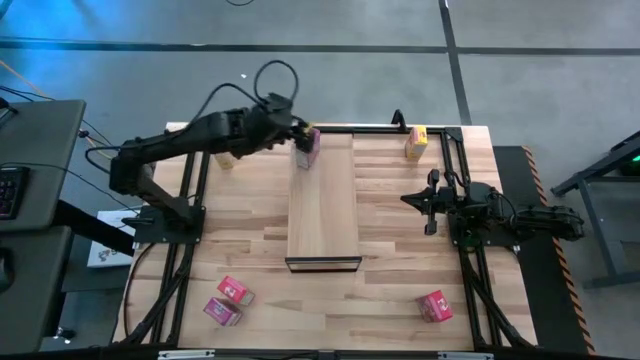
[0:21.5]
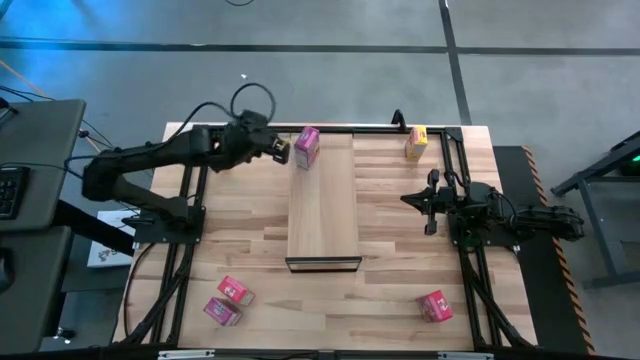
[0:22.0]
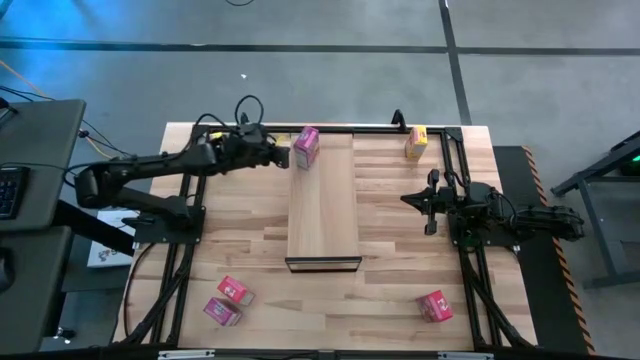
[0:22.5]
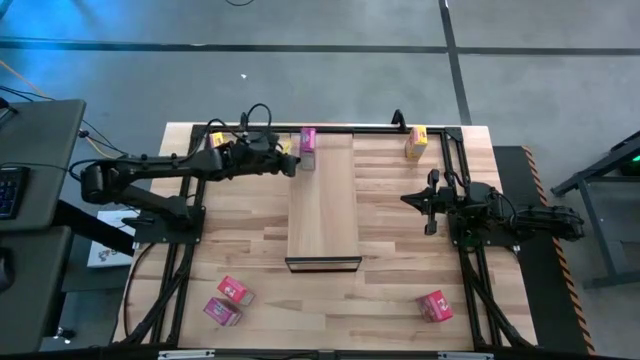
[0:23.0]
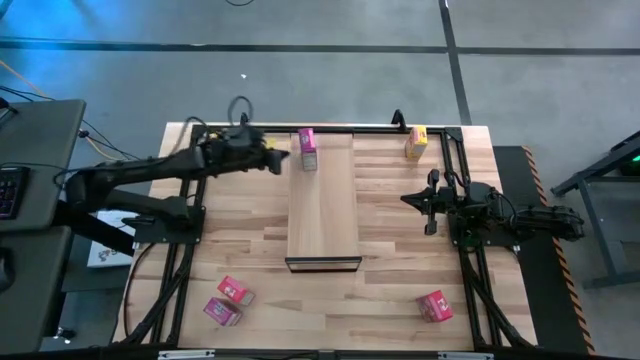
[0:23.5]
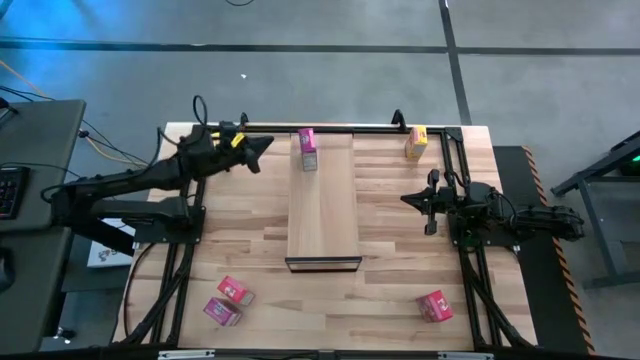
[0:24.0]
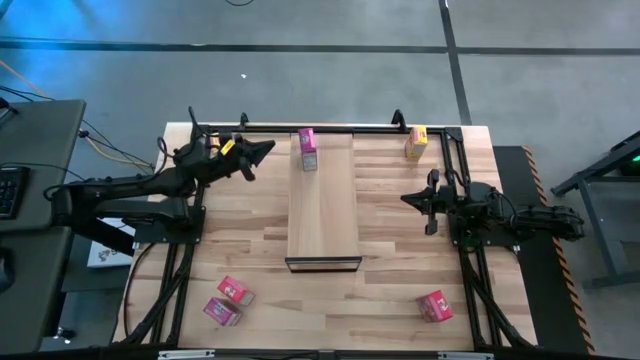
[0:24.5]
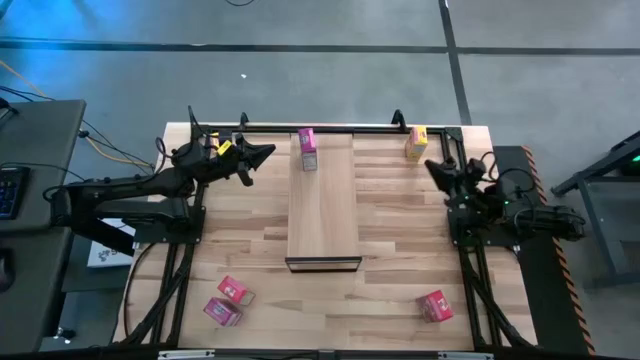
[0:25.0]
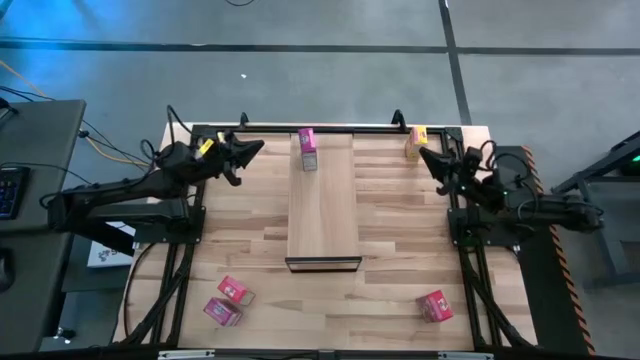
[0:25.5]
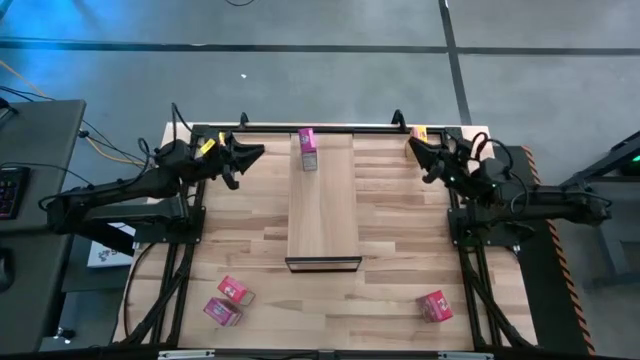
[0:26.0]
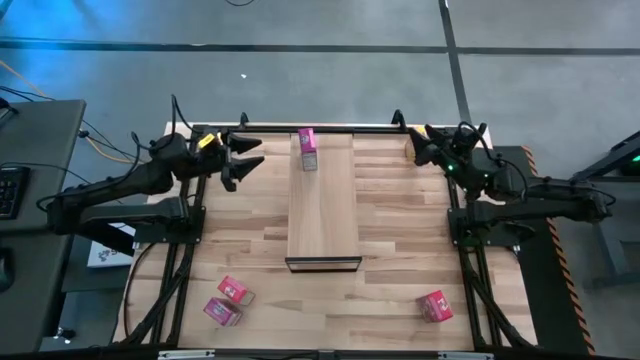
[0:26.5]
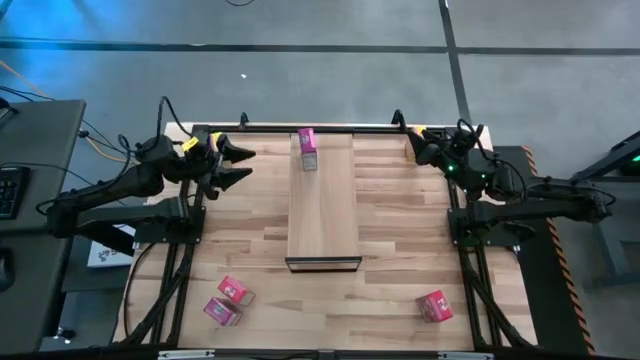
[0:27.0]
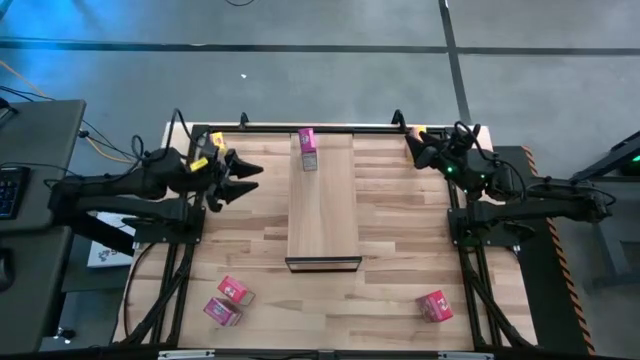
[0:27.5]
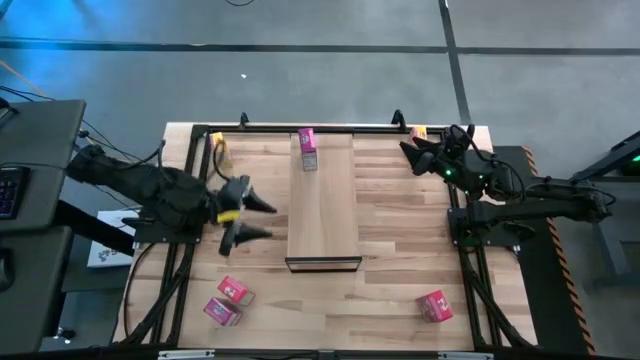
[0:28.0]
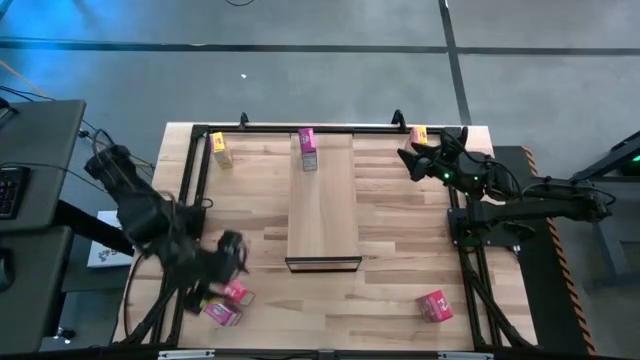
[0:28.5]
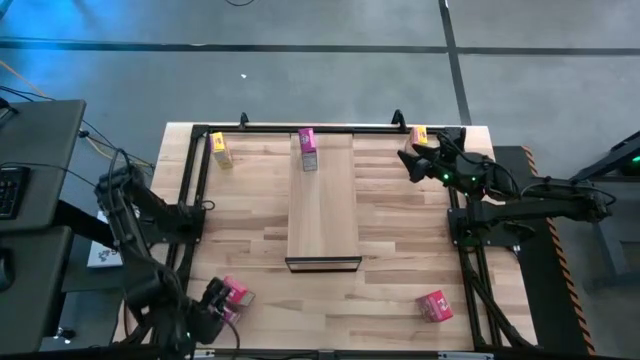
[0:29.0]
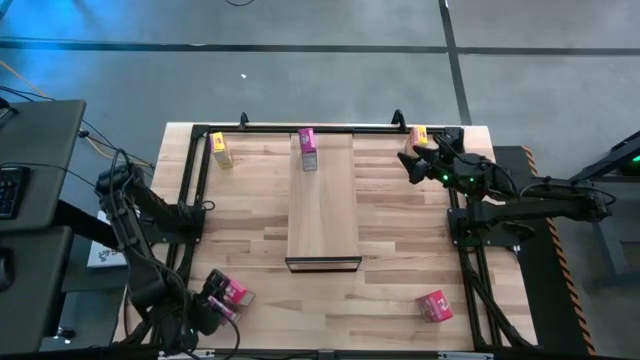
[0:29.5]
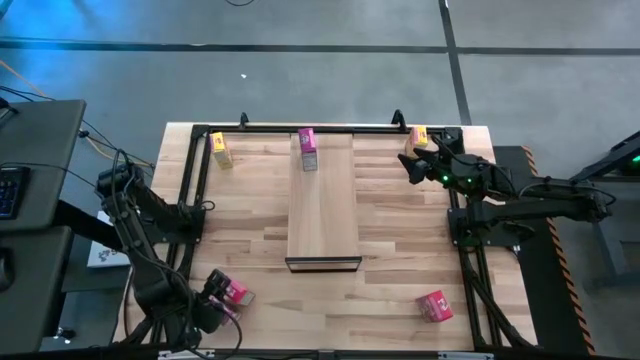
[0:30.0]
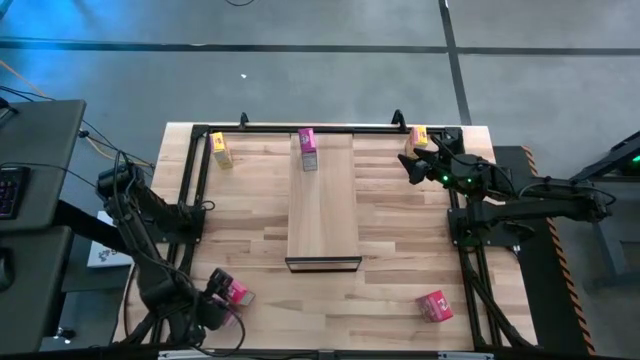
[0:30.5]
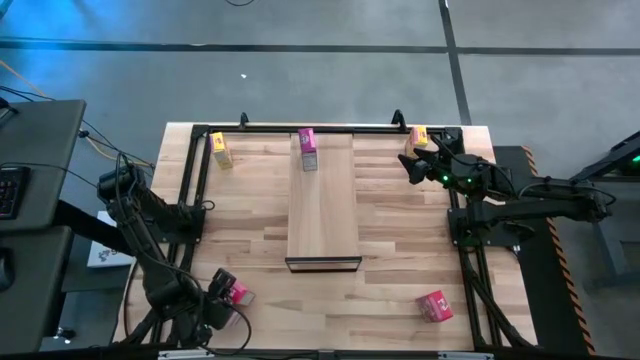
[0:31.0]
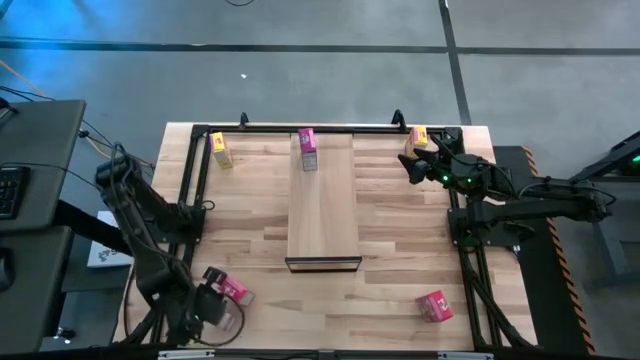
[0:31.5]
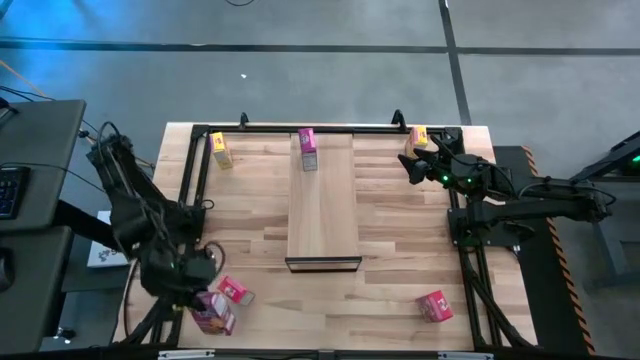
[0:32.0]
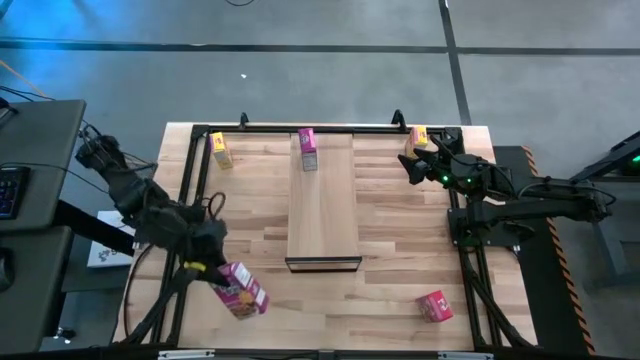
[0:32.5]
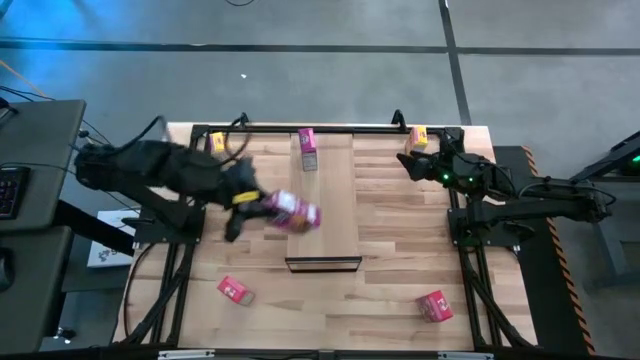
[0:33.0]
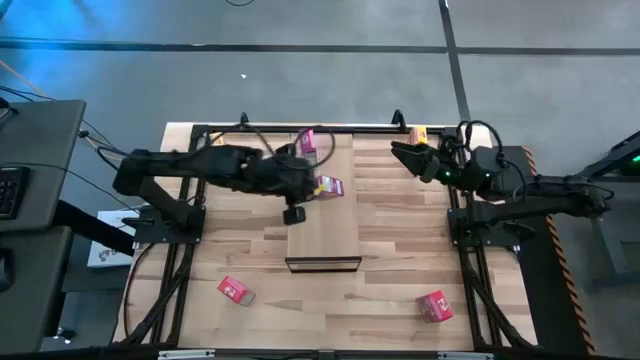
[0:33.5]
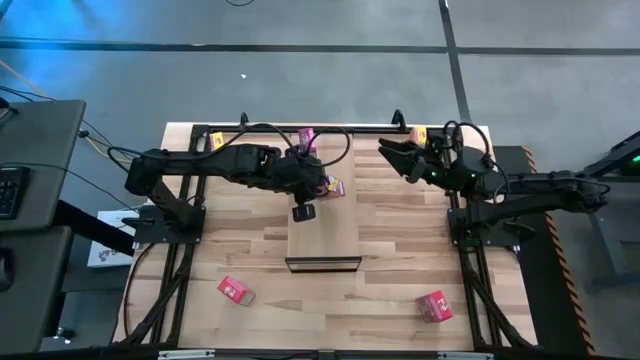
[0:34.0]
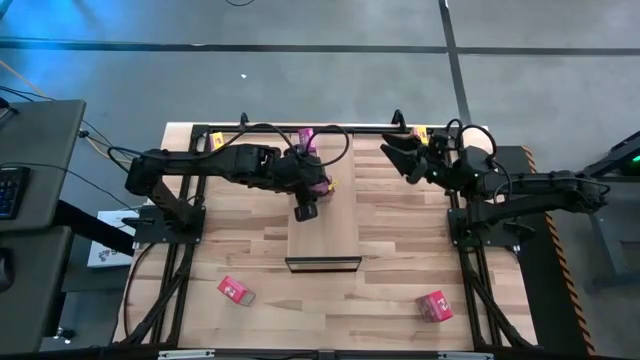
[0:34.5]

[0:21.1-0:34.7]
Task: Stack cereal on shelf
Put the purple cereal box on the shelf aligned with the other purple cereal box

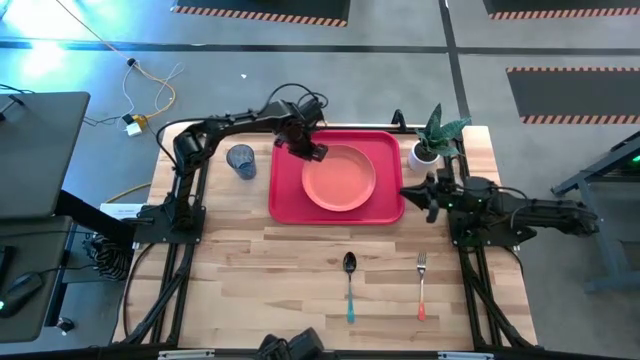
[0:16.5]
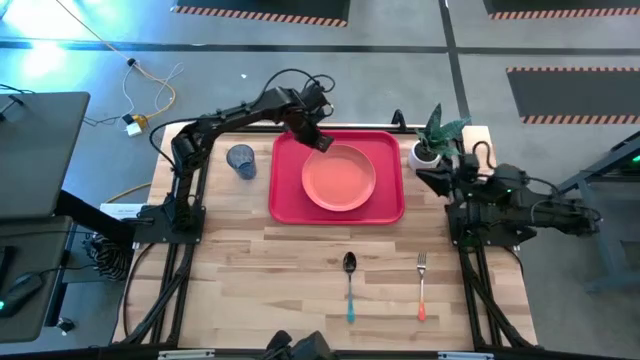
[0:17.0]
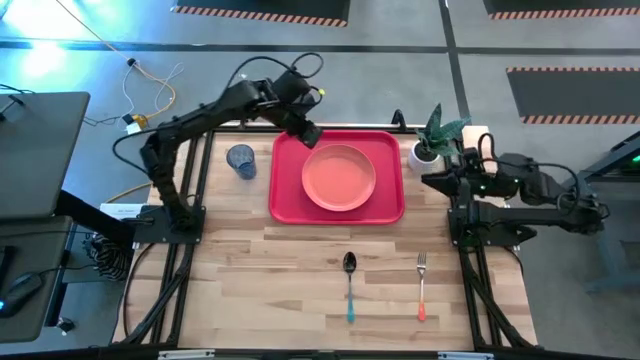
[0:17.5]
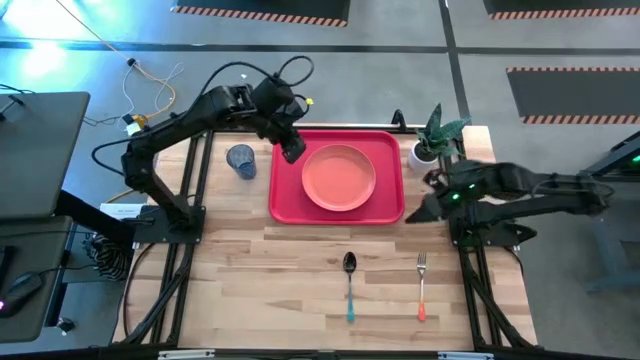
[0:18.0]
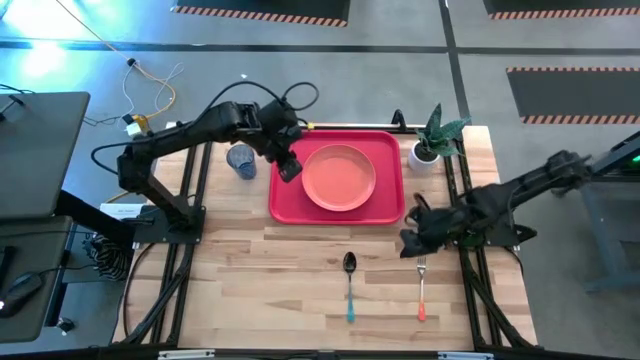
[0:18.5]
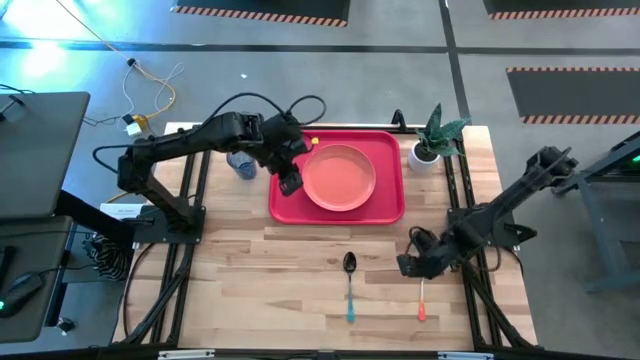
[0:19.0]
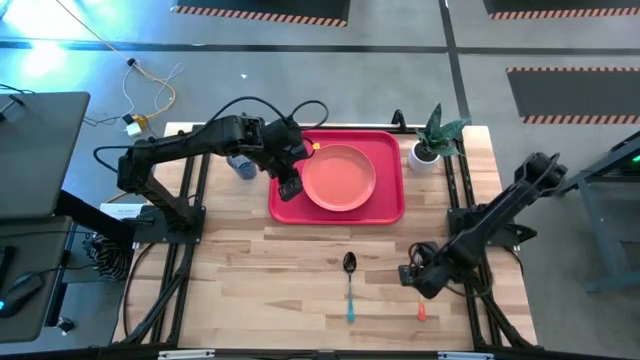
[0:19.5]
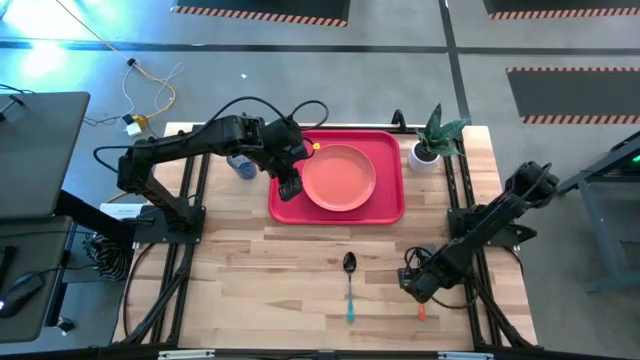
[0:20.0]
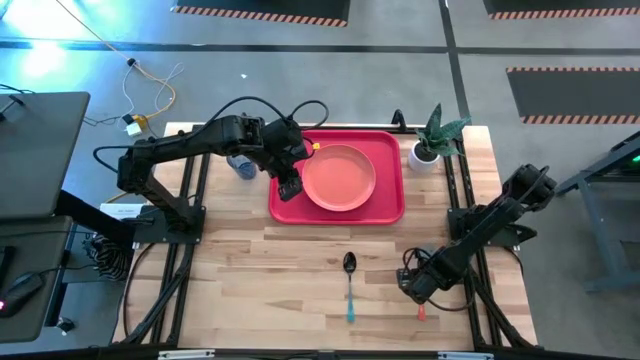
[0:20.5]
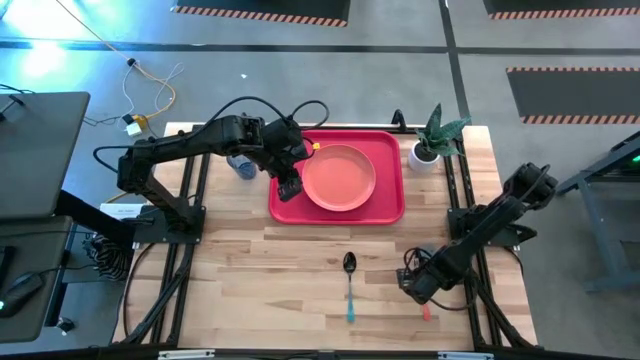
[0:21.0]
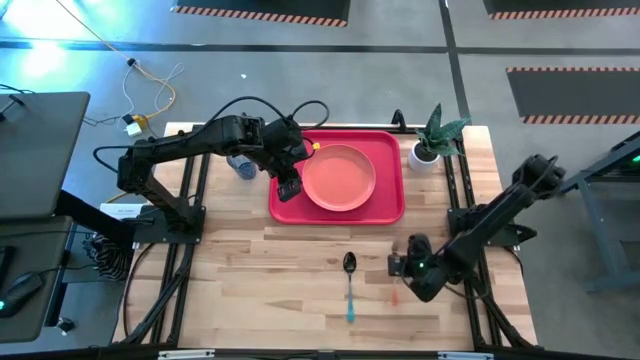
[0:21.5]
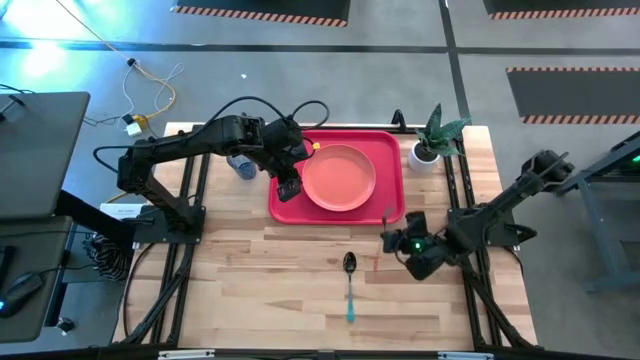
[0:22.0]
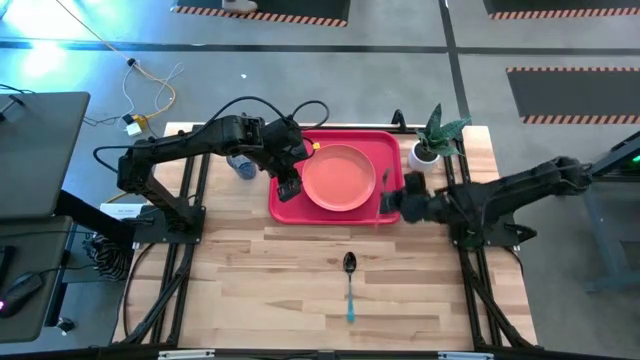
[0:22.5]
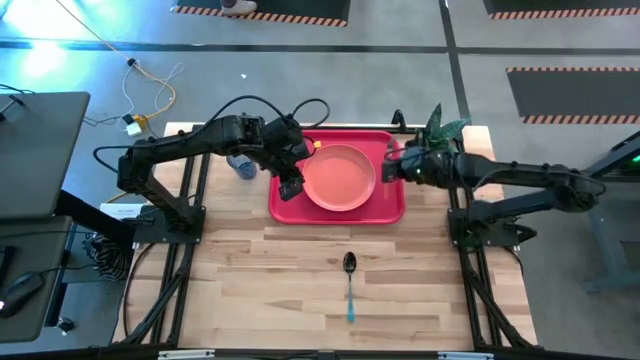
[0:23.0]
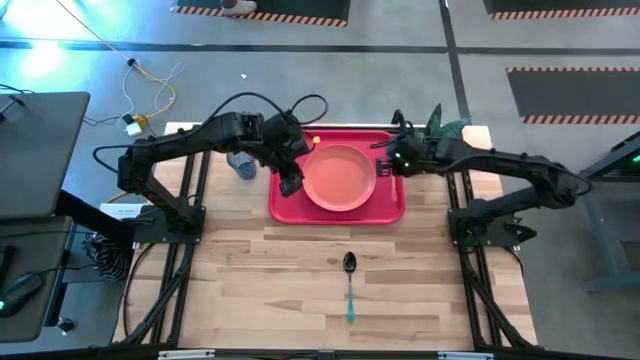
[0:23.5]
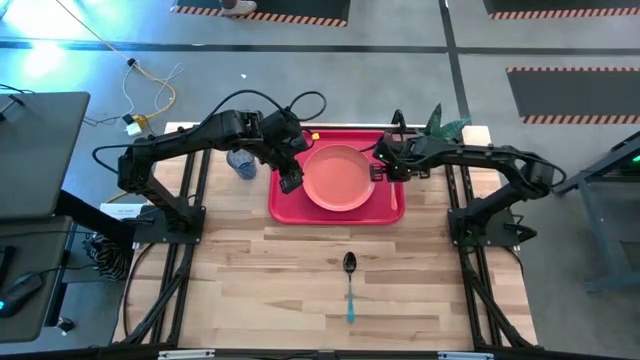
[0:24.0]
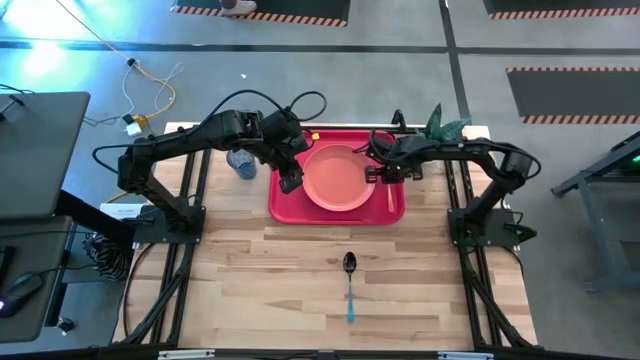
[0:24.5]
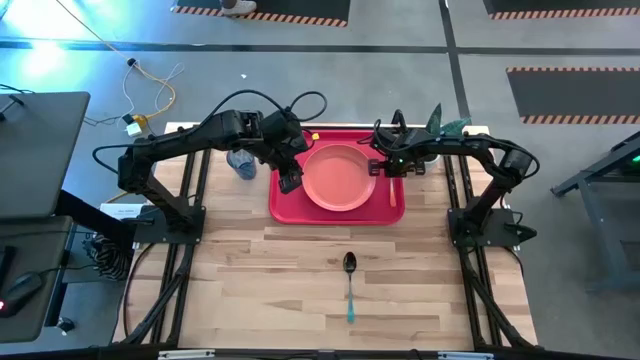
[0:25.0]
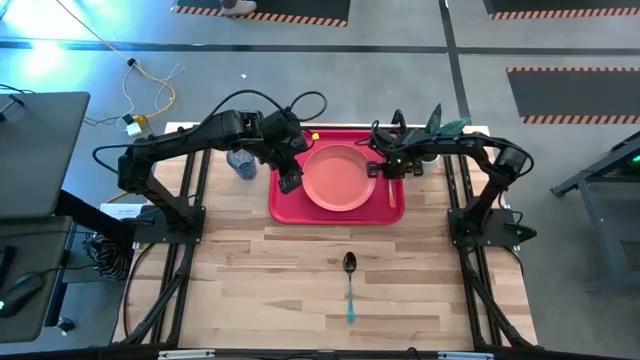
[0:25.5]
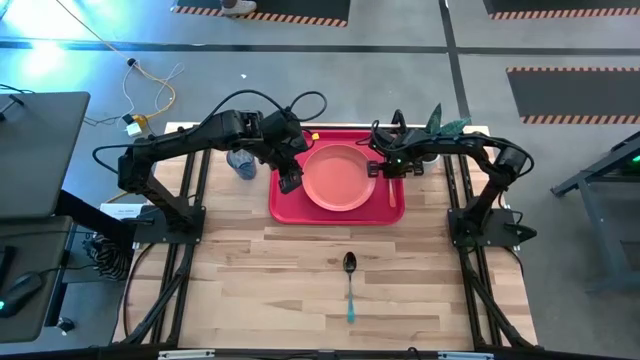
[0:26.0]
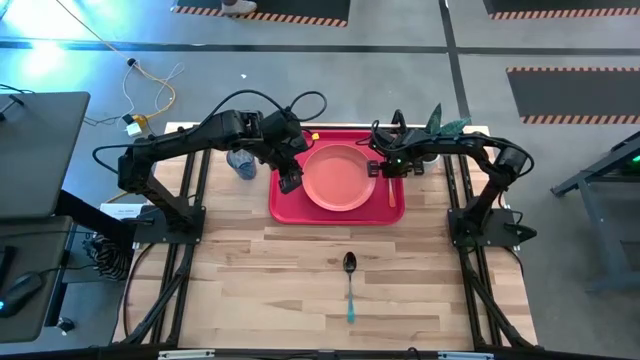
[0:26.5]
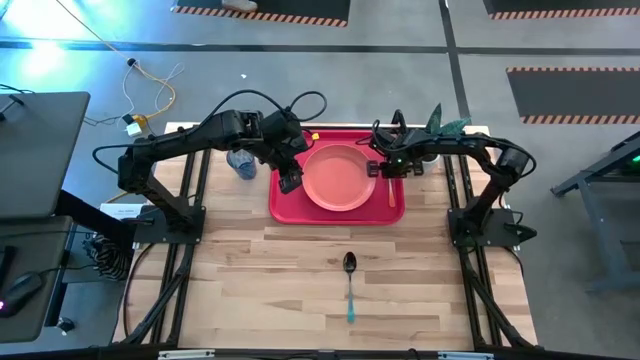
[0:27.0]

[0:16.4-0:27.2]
Task: Pick and place plate/cup/fork/spoon on tray
Put the orange fork to the right of the orange plate on the red tray
